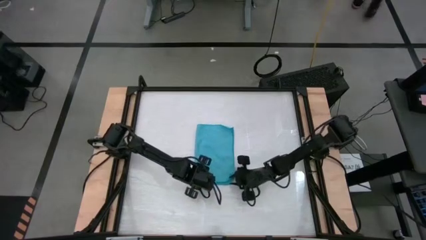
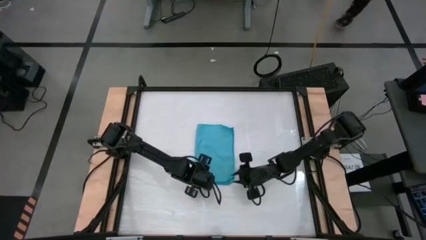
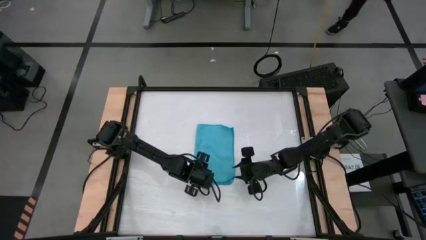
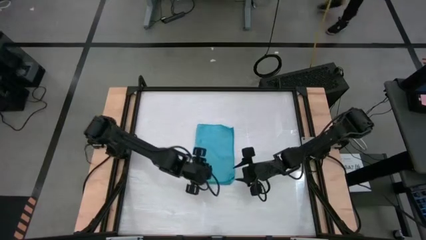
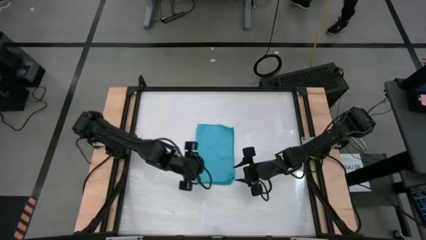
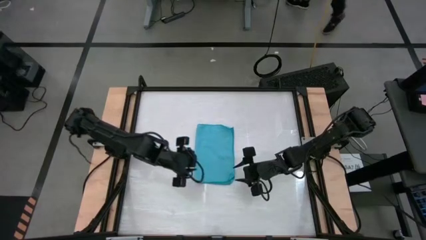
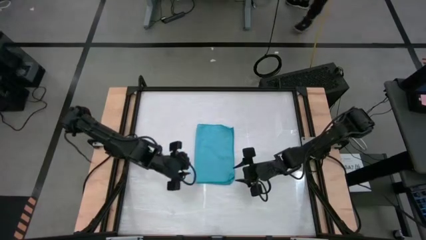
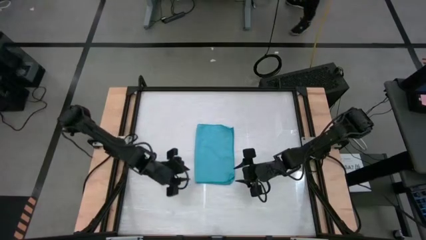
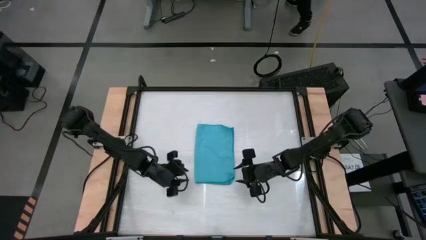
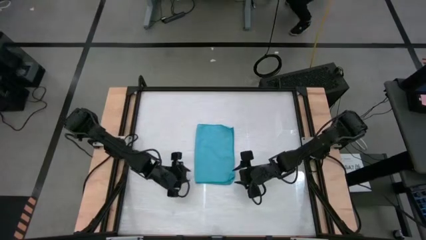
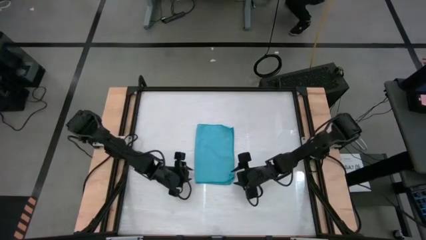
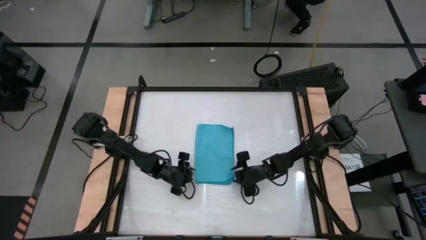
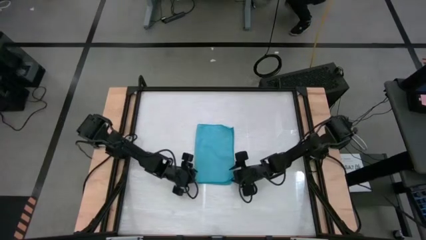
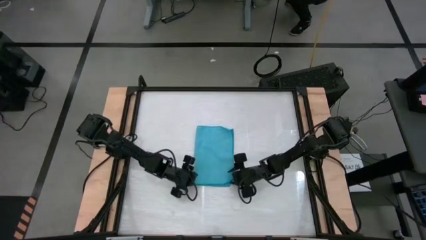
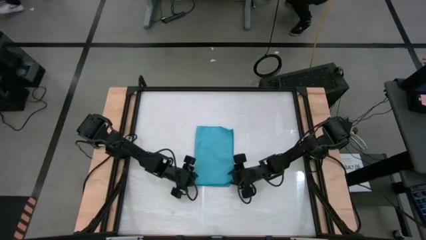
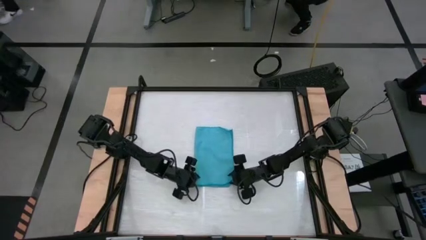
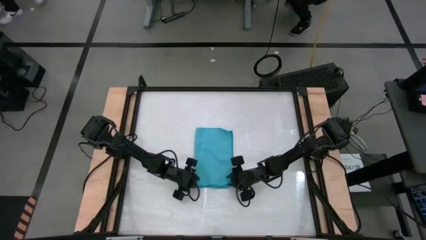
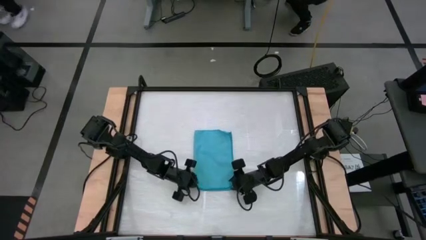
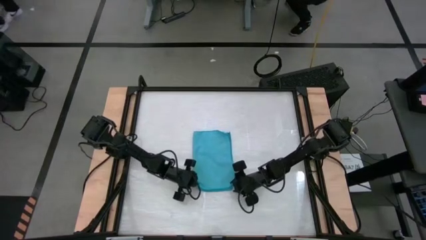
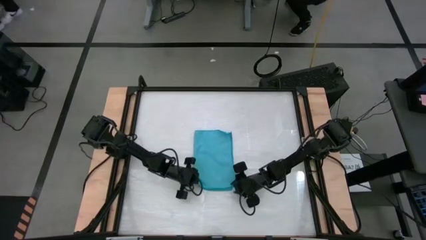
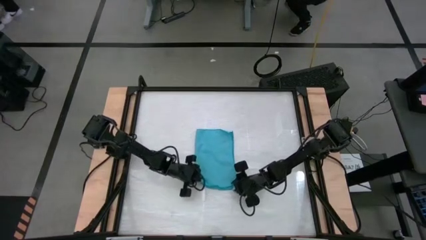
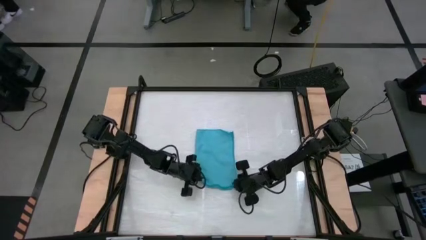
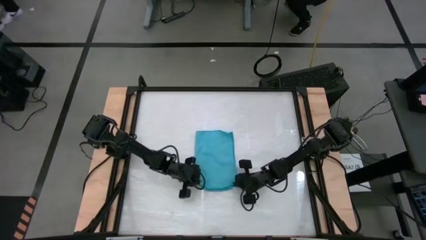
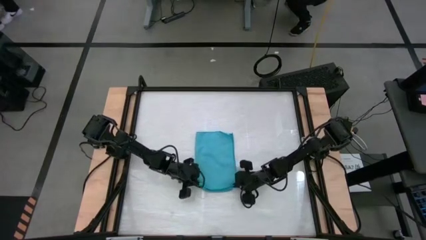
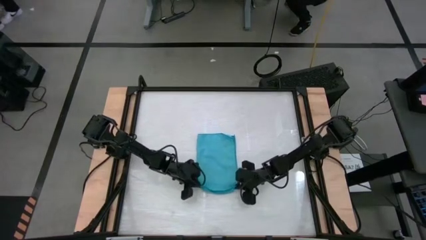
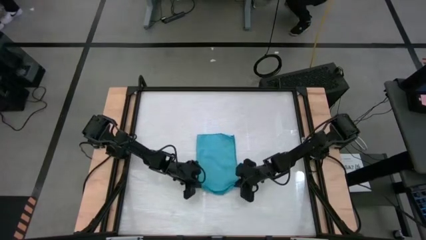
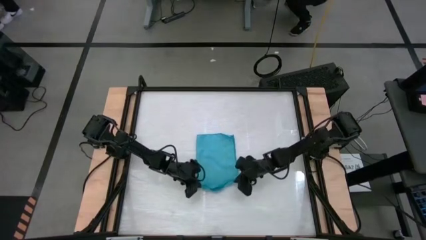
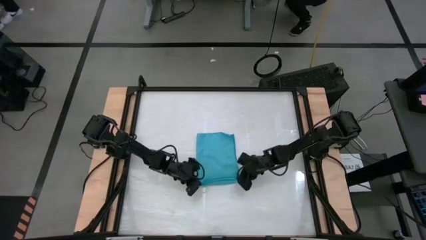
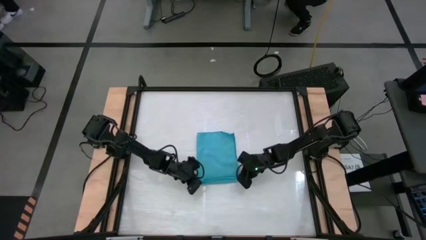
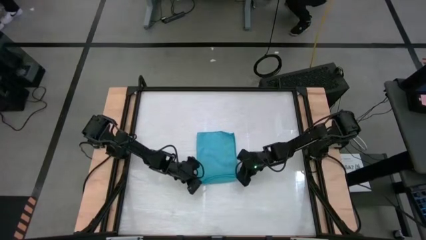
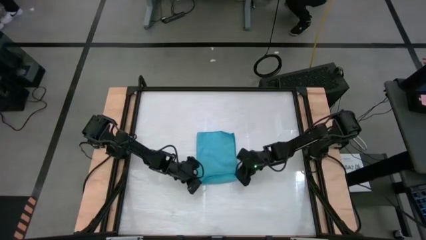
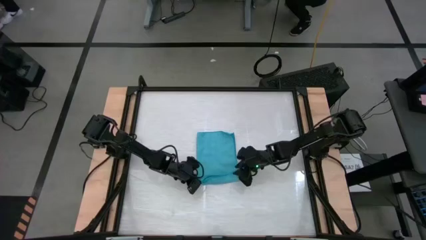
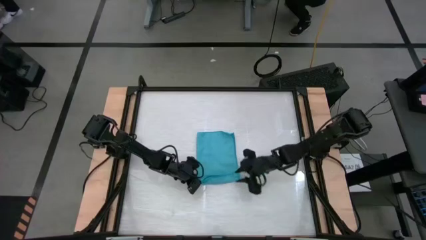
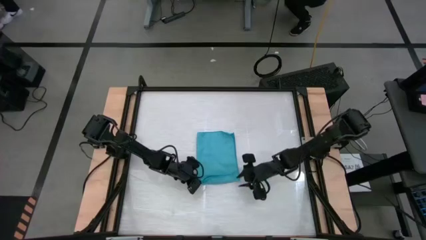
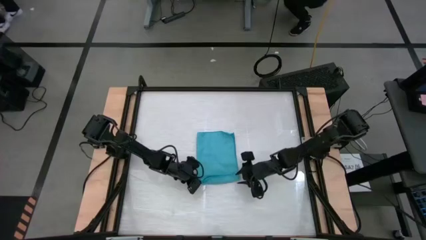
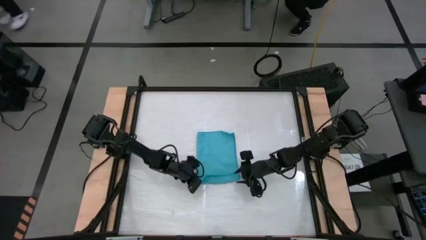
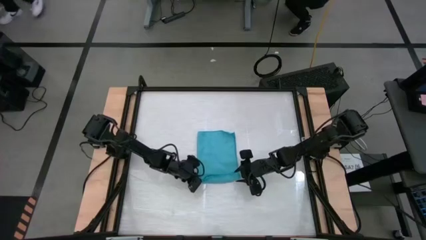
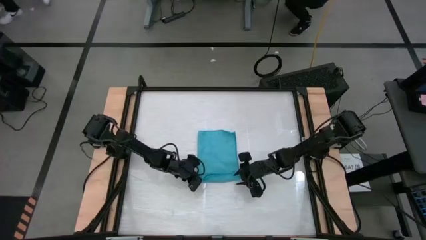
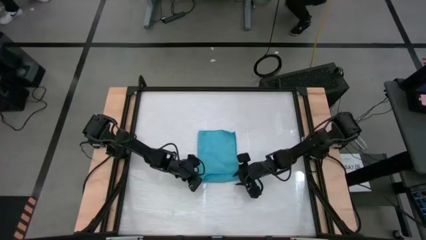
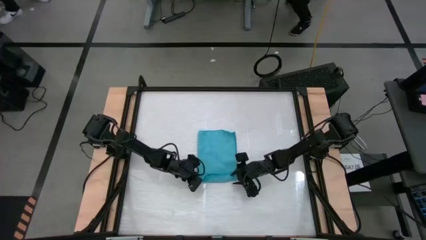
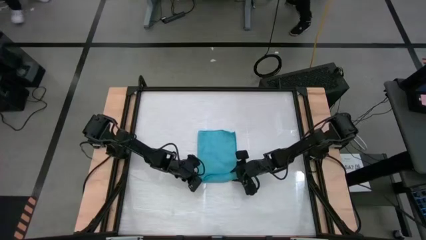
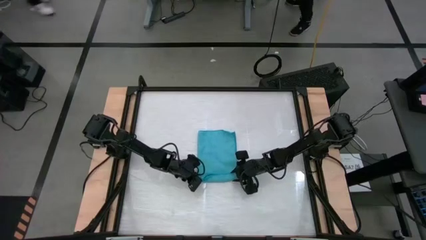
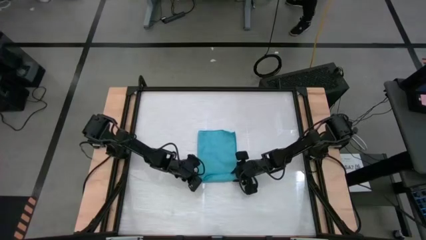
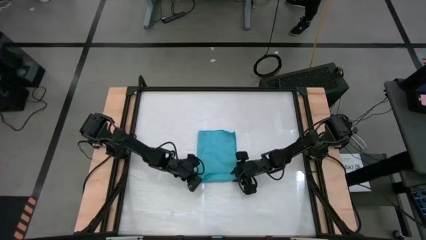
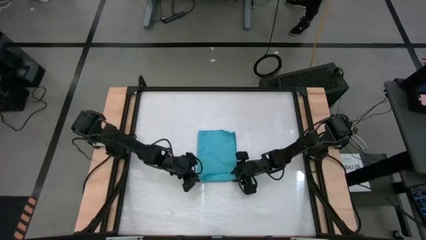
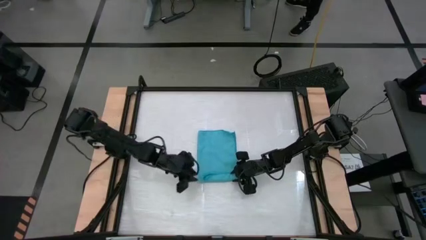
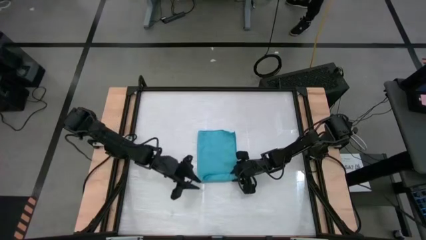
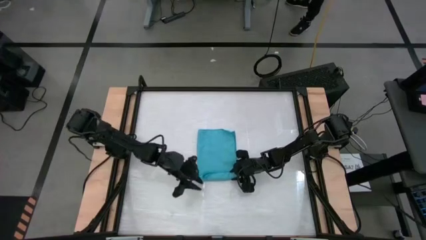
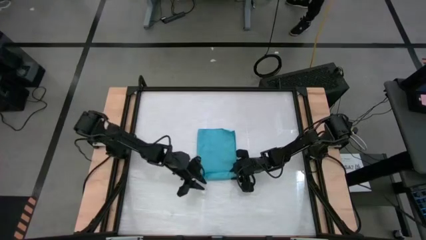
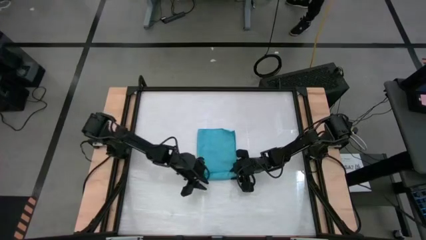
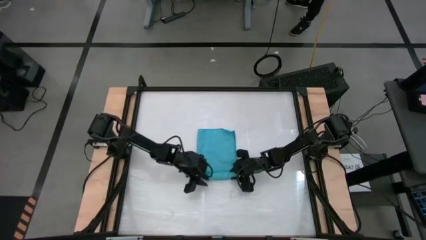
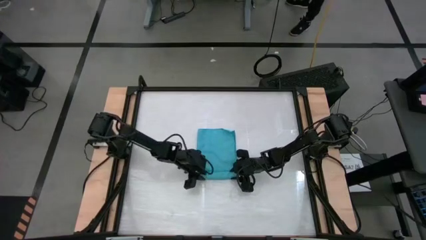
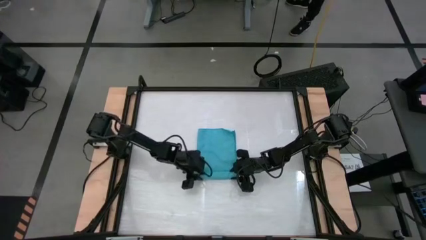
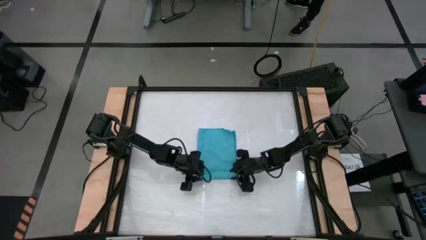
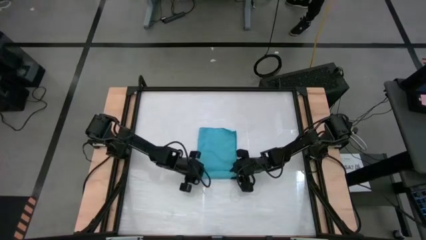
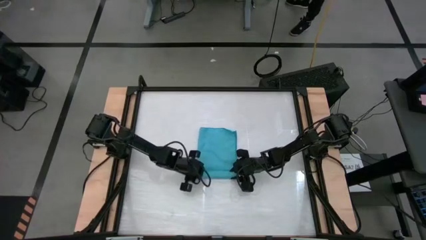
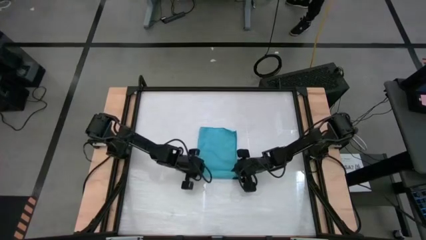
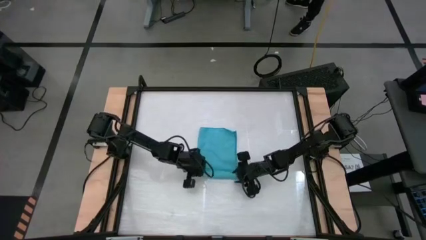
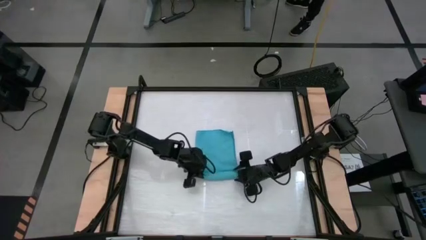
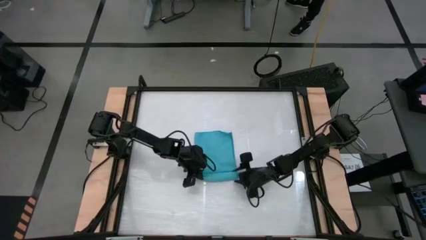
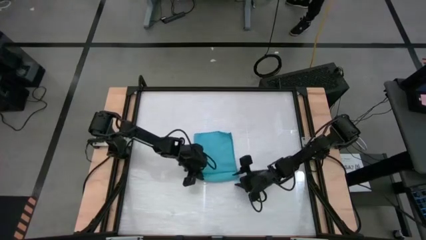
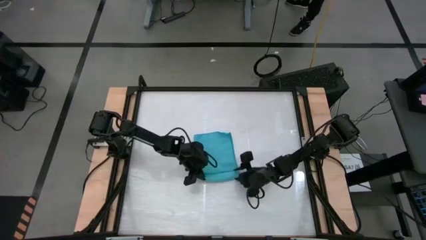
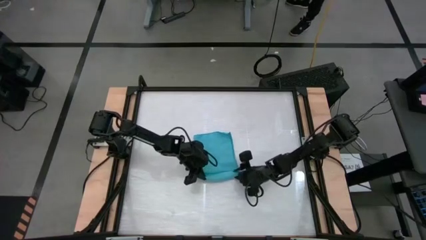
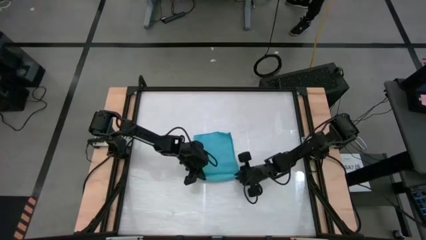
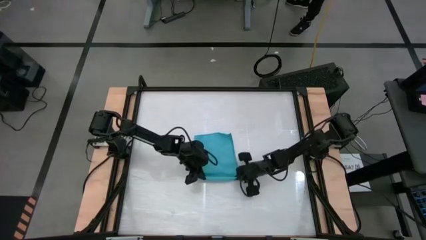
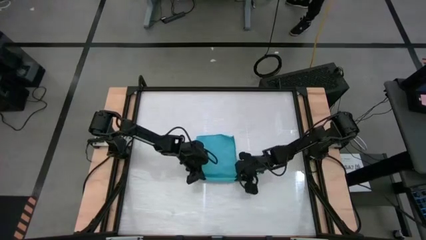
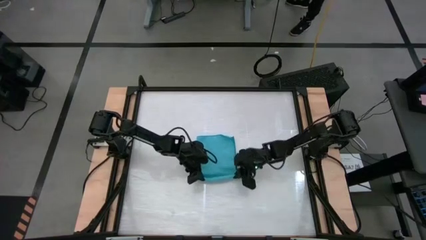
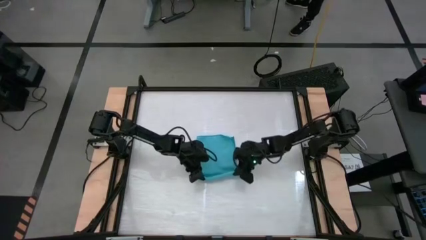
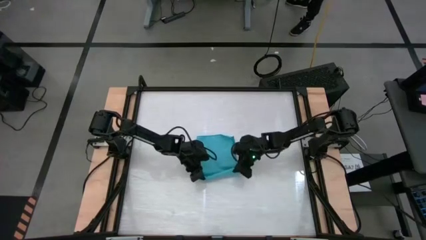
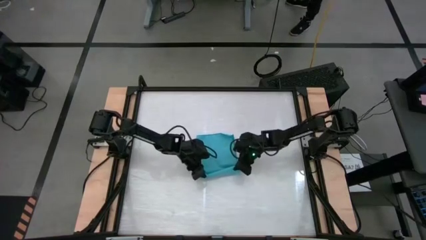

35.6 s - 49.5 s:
Task: Roll towel
Roll the light blue towel
